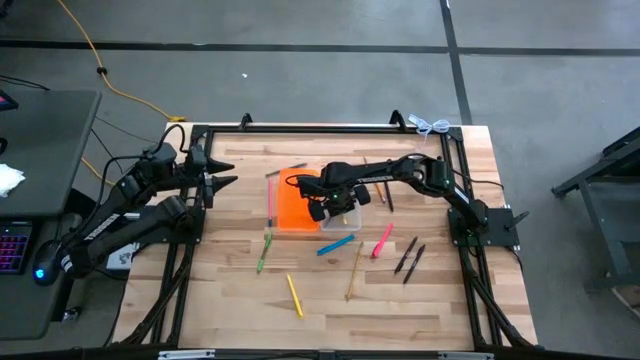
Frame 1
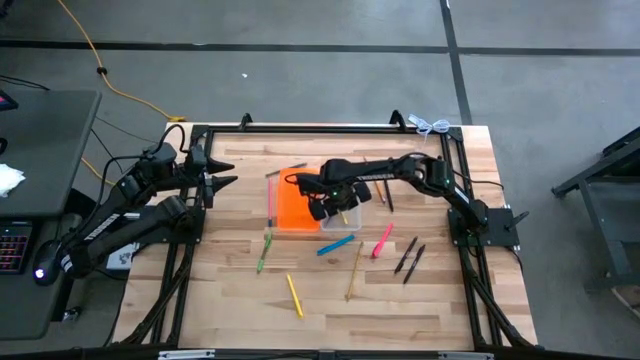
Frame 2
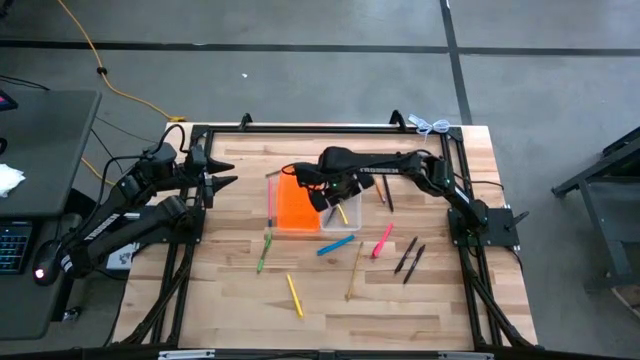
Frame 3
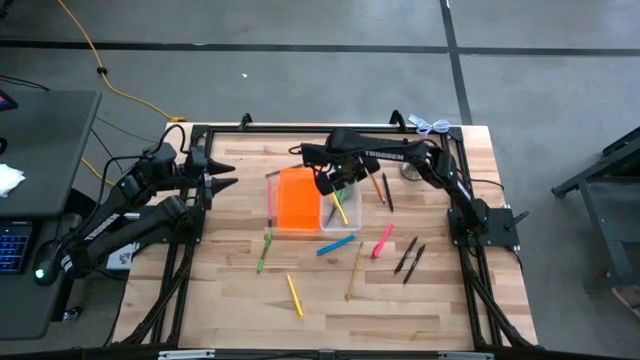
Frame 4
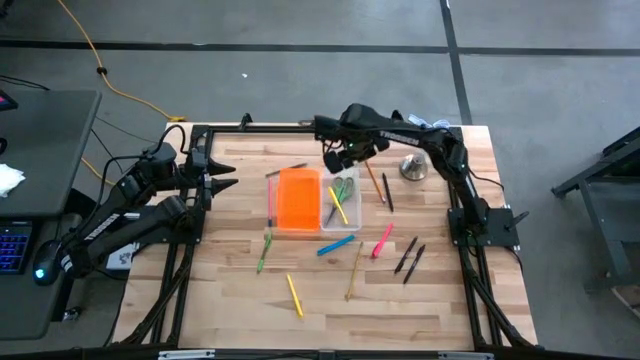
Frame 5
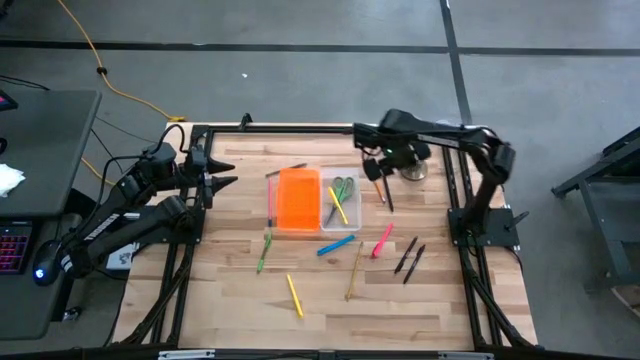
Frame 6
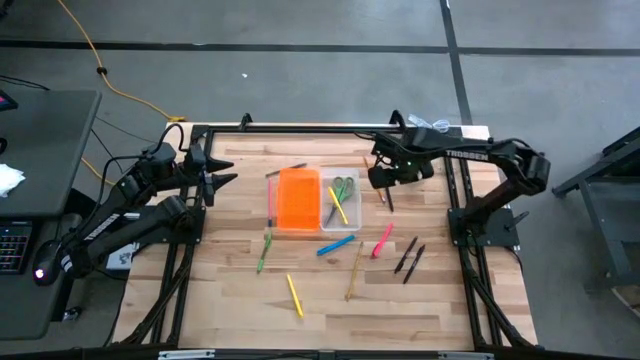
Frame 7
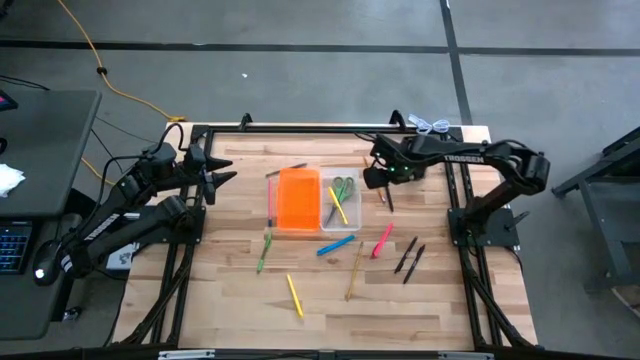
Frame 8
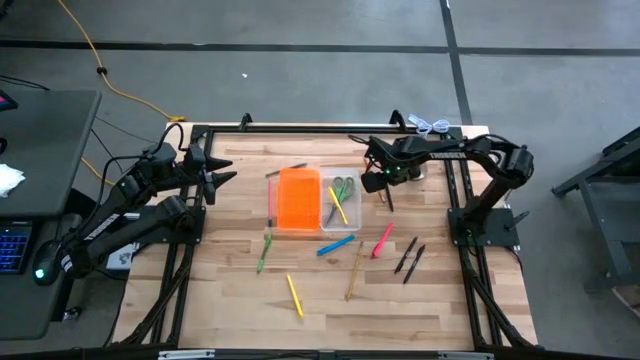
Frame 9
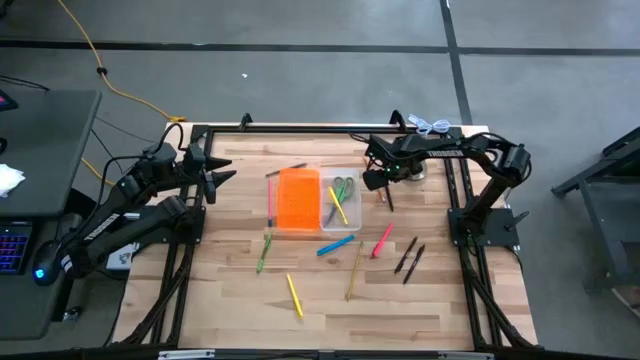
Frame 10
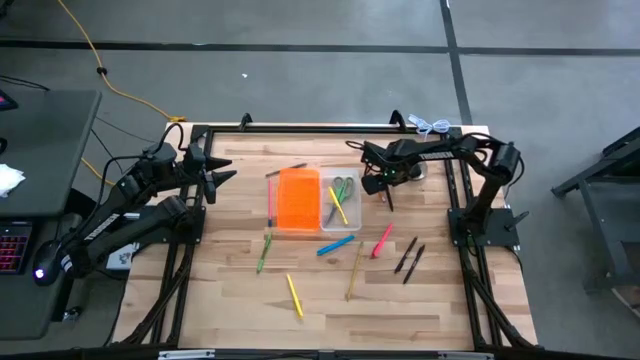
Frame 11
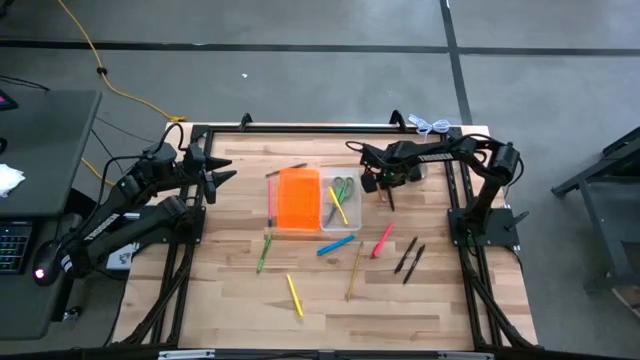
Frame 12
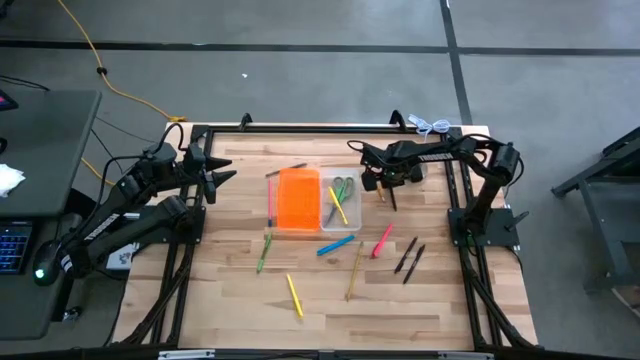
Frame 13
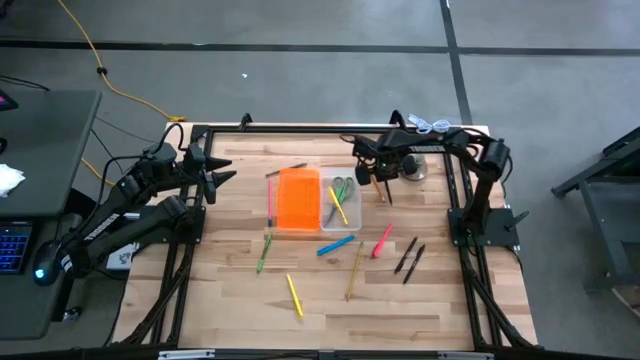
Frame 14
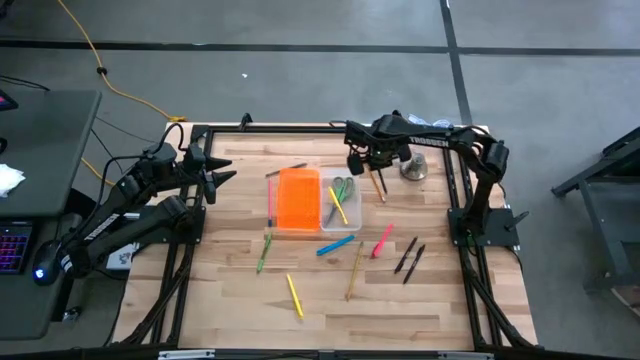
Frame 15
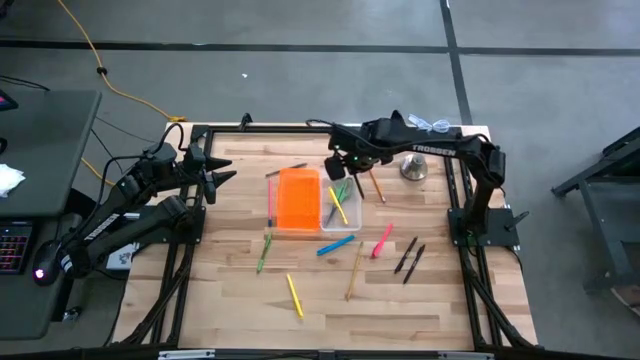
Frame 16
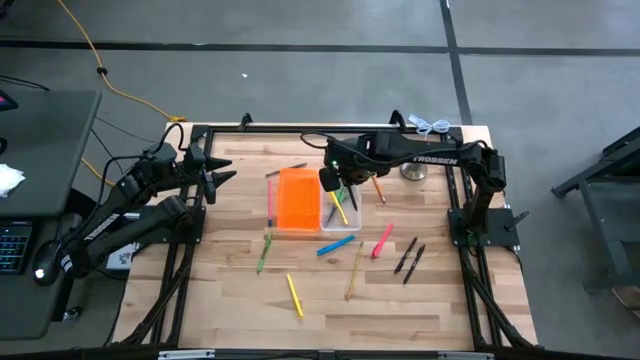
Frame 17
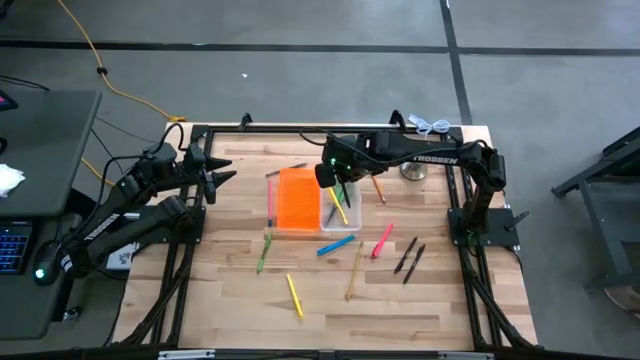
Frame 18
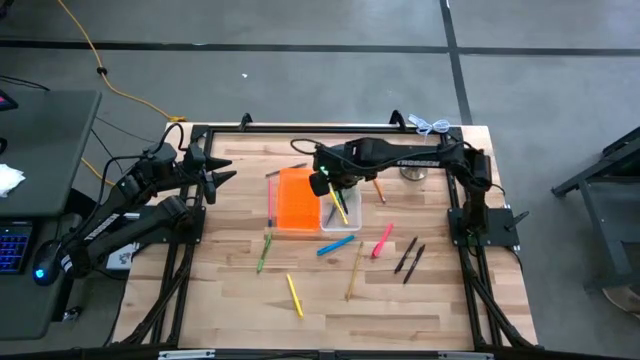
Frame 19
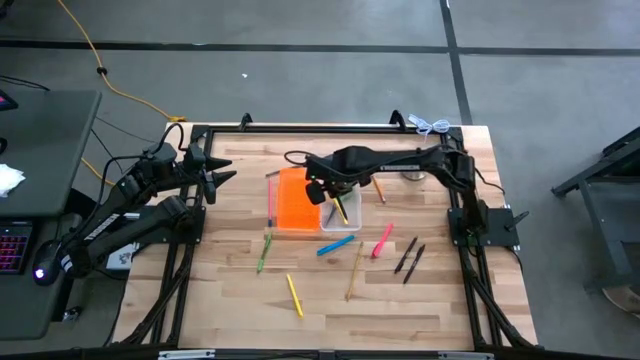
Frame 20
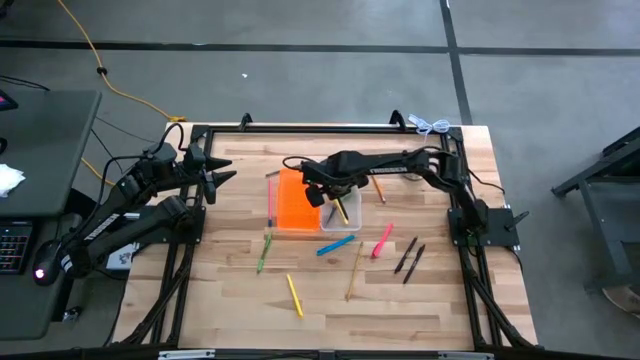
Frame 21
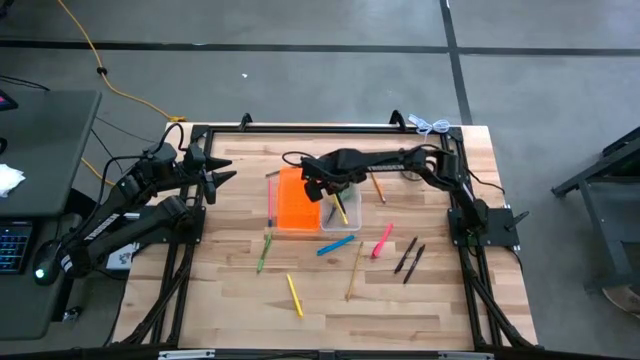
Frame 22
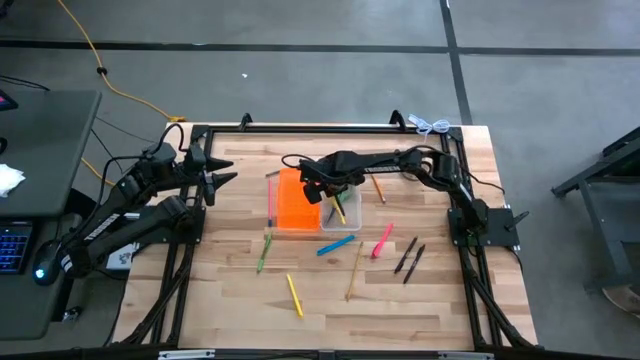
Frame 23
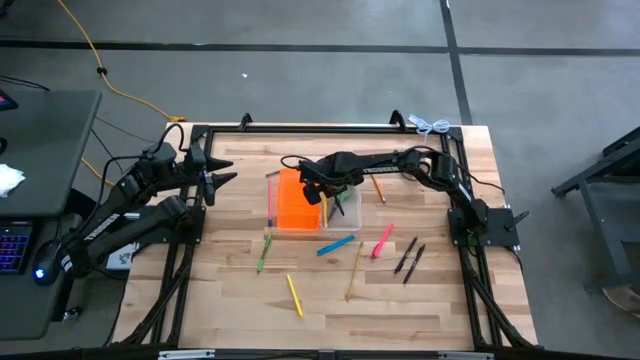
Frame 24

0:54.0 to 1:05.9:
Task: Pick & place school supplies into a supply box
Put the black pen into the supply box

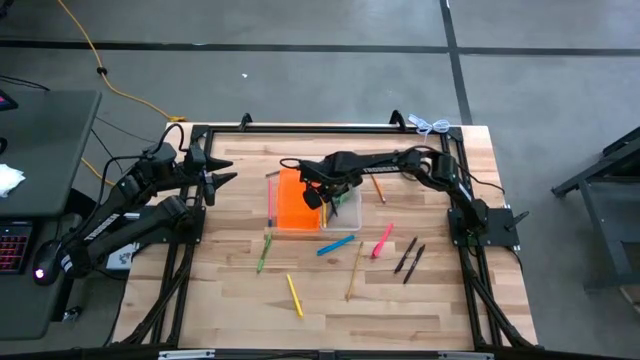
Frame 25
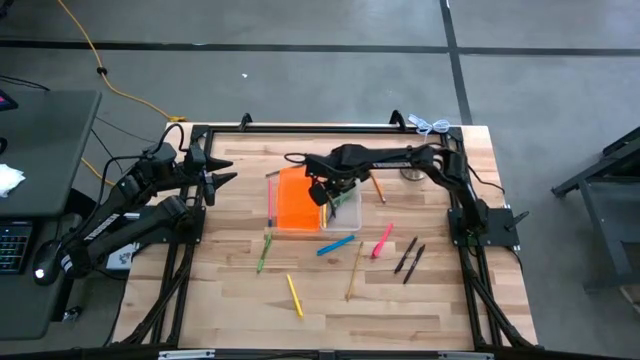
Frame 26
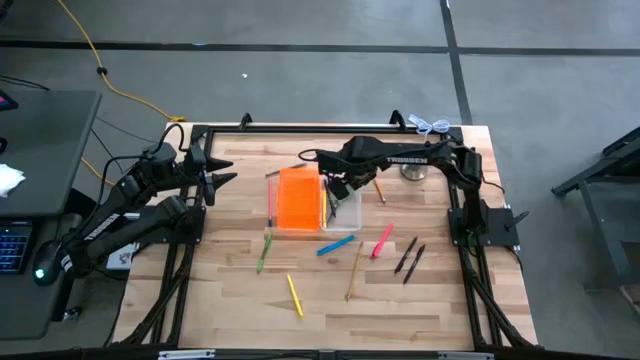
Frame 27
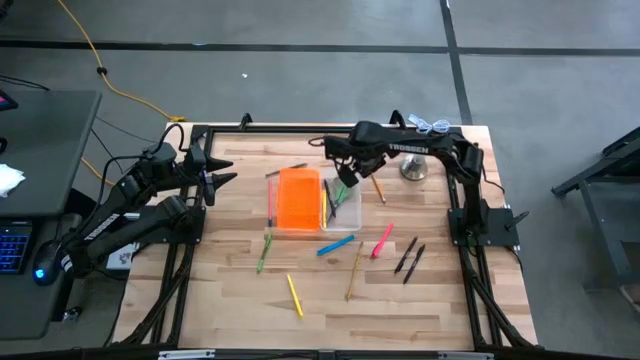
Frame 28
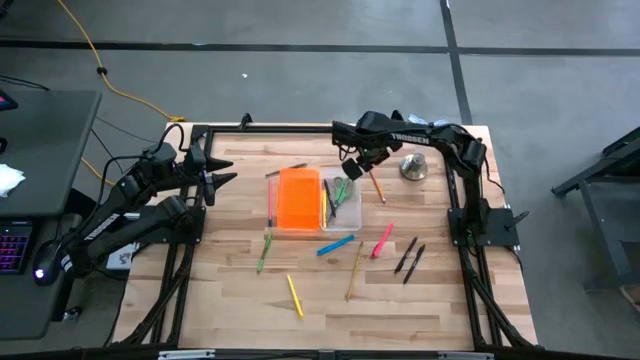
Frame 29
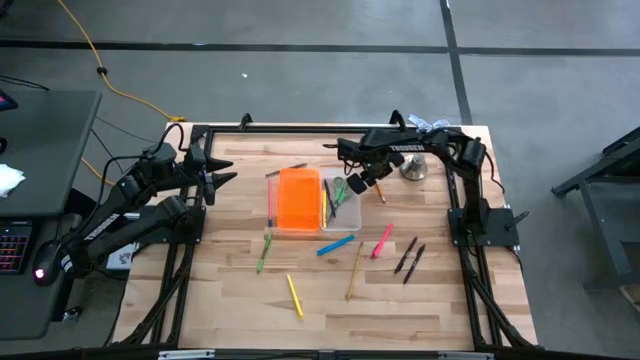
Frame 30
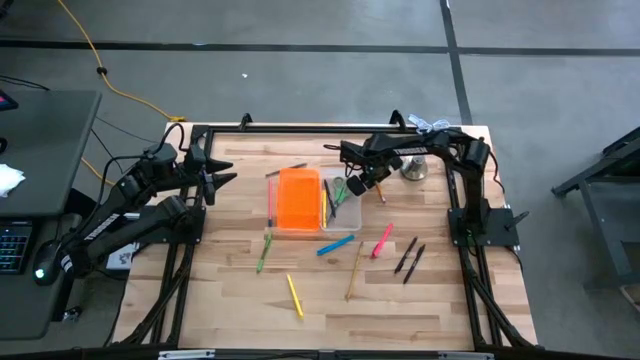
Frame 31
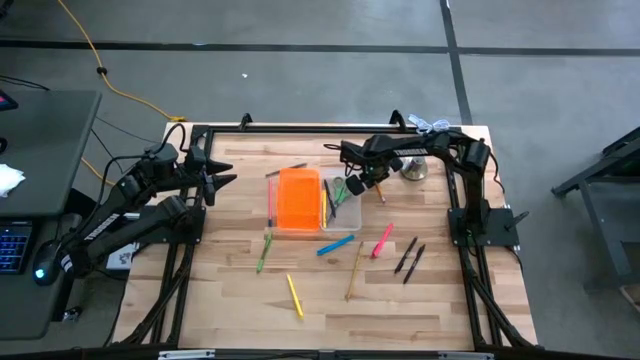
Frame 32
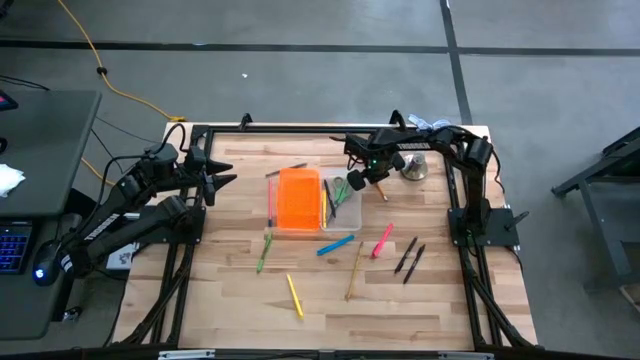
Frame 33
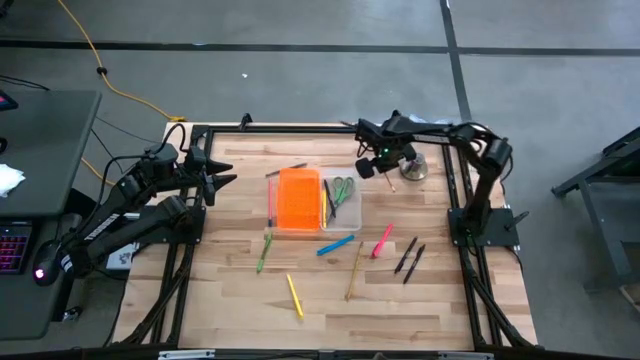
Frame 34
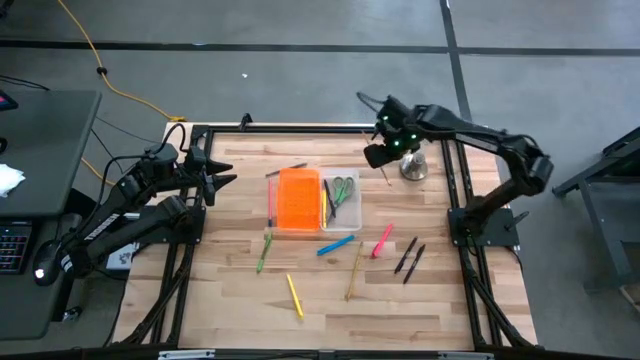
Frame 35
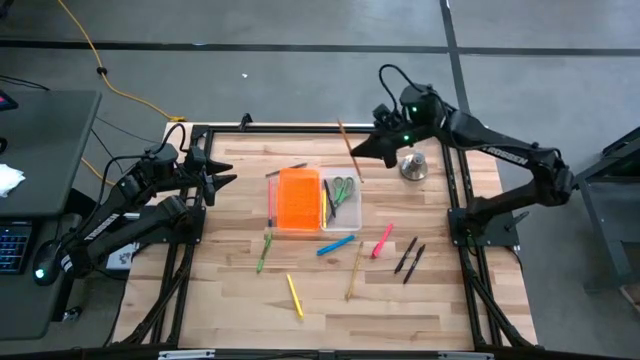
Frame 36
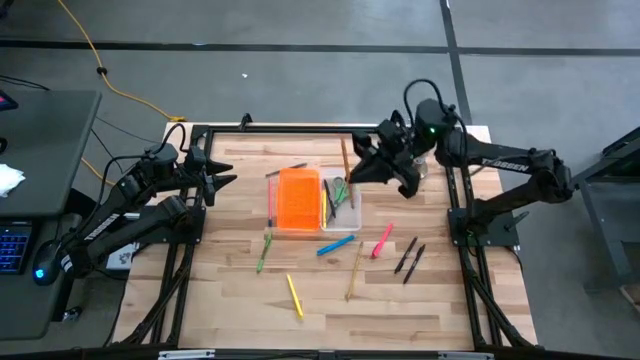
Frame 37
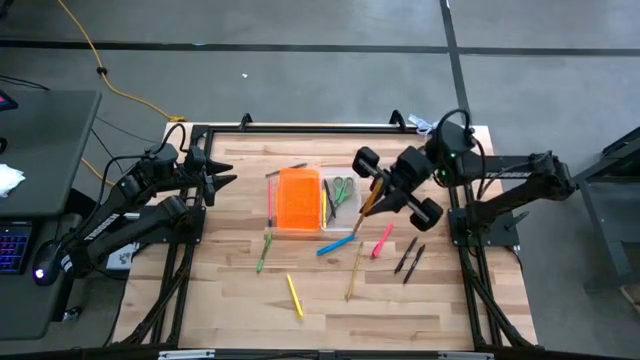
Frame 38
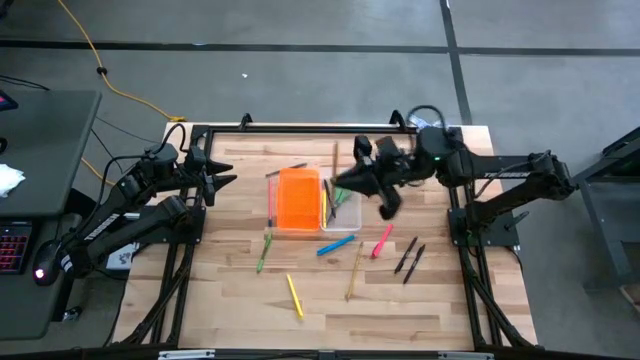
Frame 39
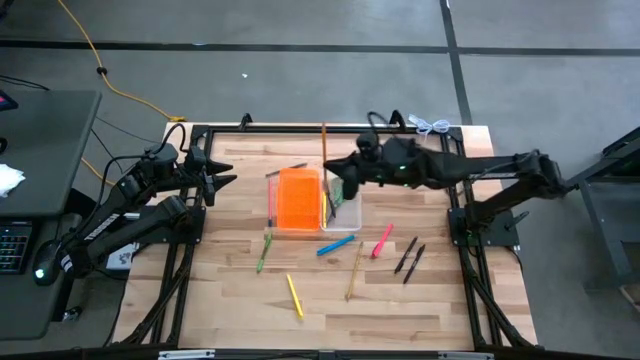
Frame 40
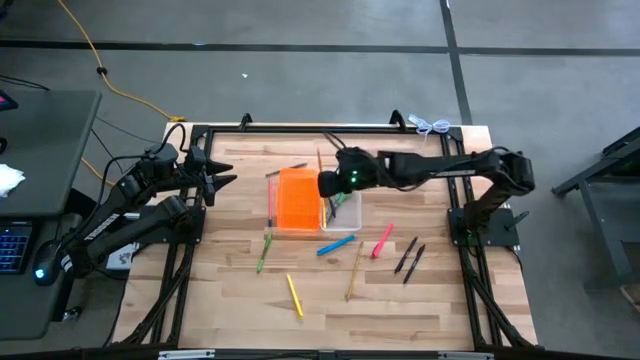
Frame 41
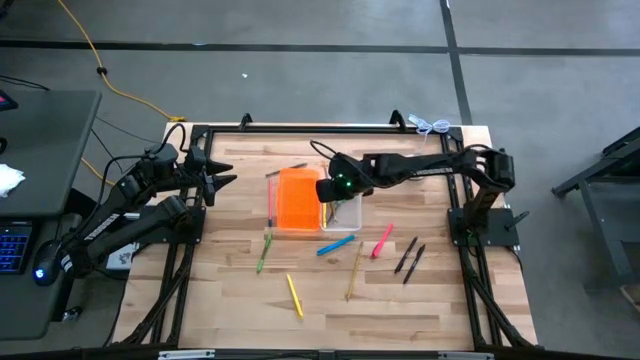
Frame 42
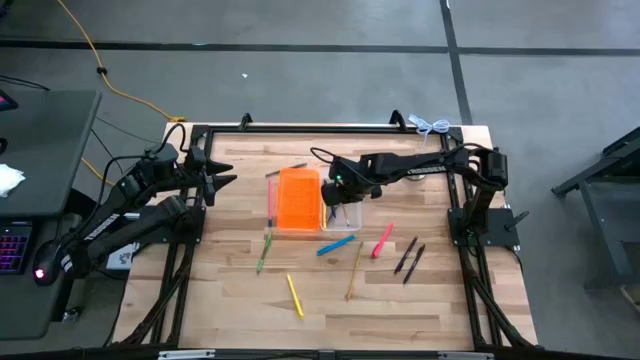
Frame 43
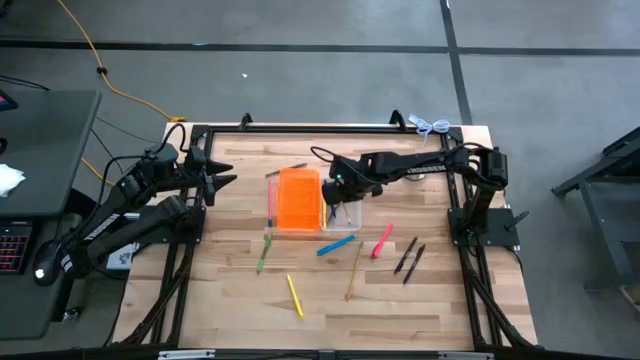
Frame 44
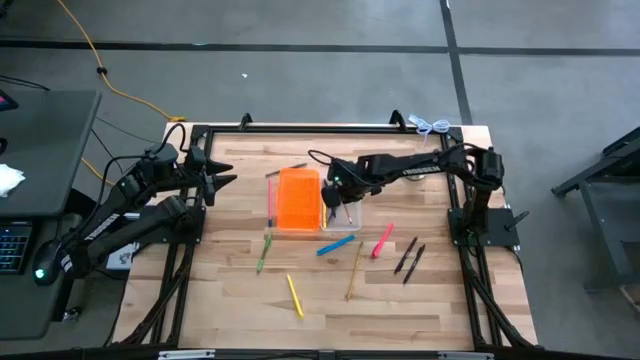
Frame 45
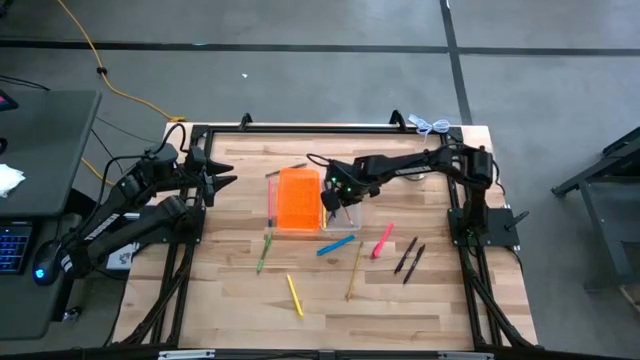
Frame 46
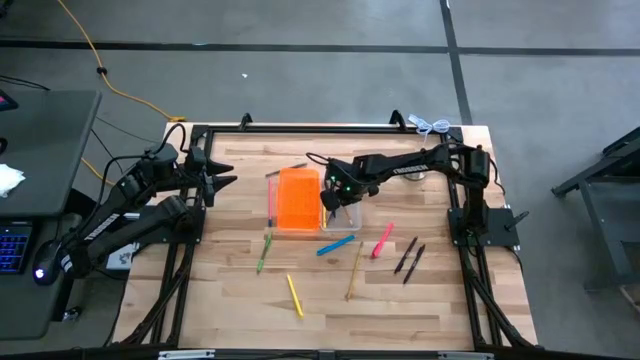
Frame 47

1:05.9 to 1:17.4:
Put the orange pencil into the supply box
